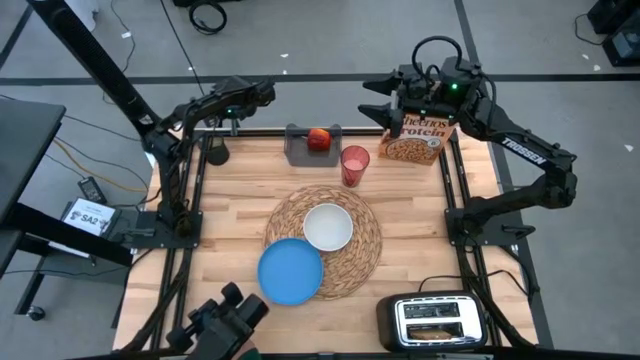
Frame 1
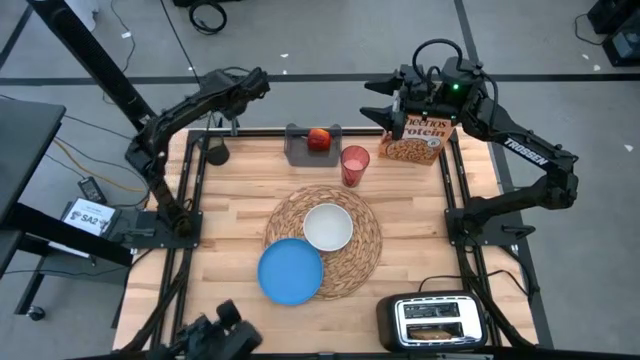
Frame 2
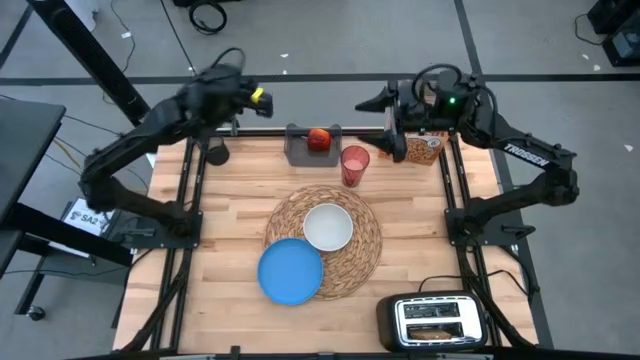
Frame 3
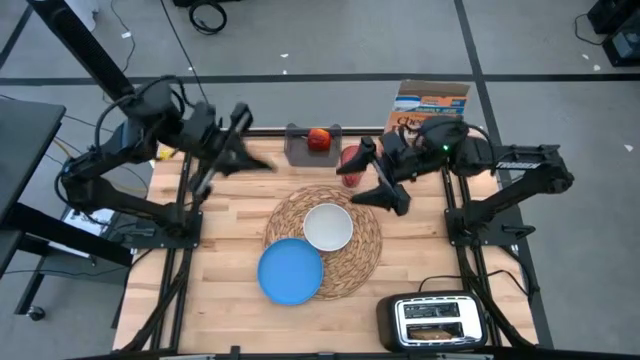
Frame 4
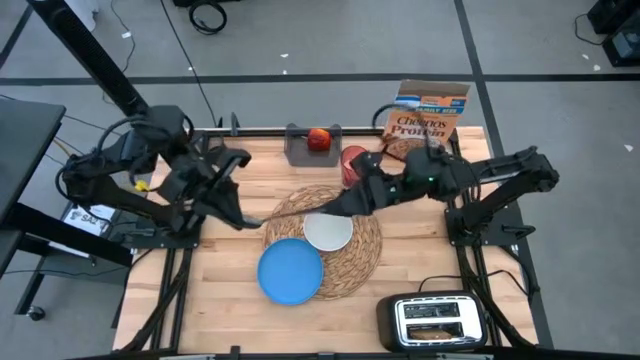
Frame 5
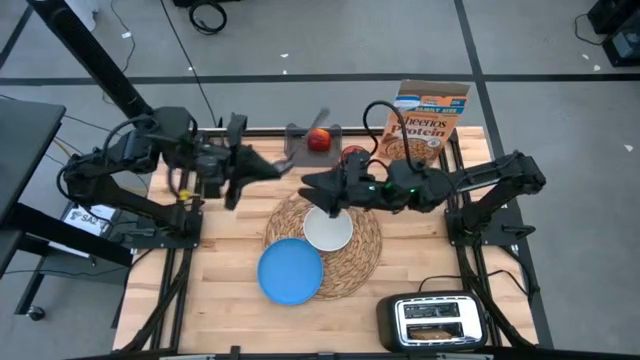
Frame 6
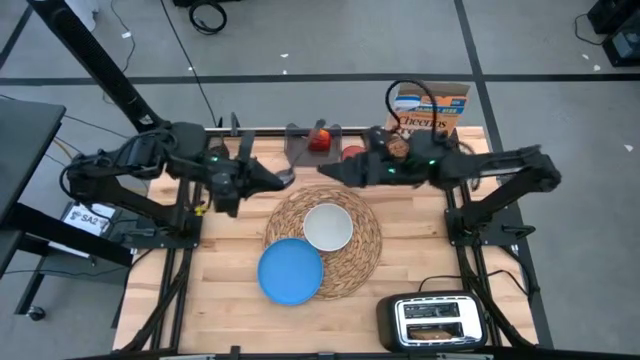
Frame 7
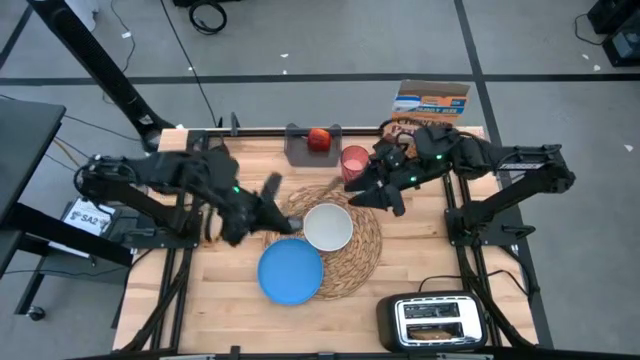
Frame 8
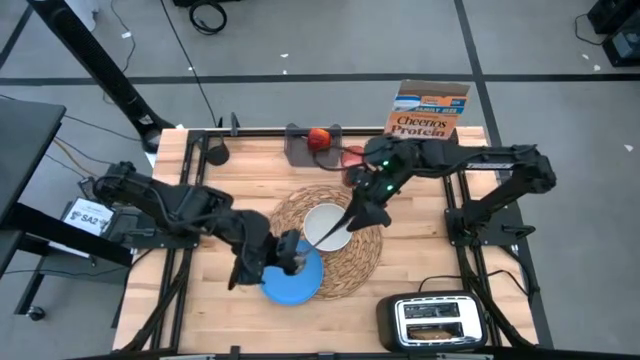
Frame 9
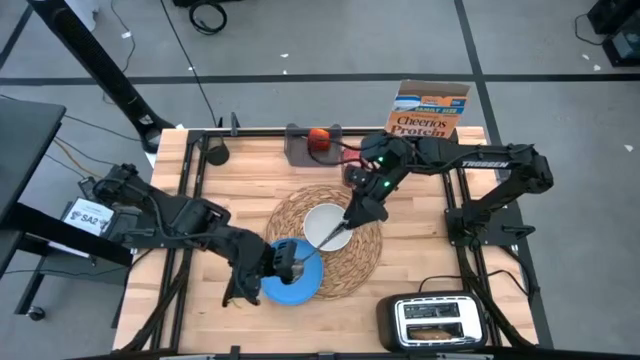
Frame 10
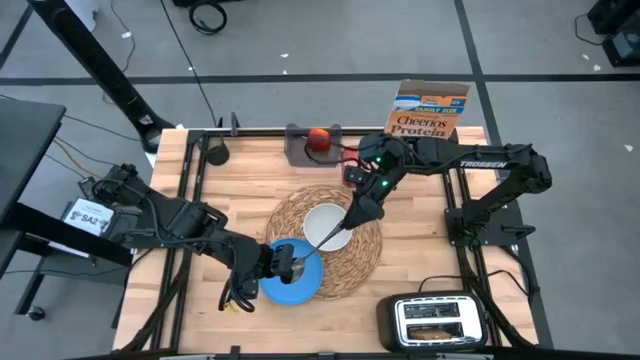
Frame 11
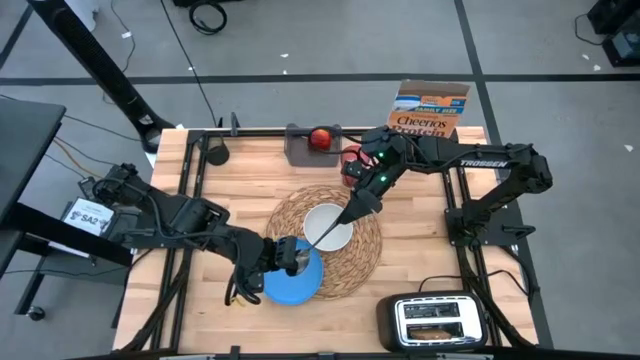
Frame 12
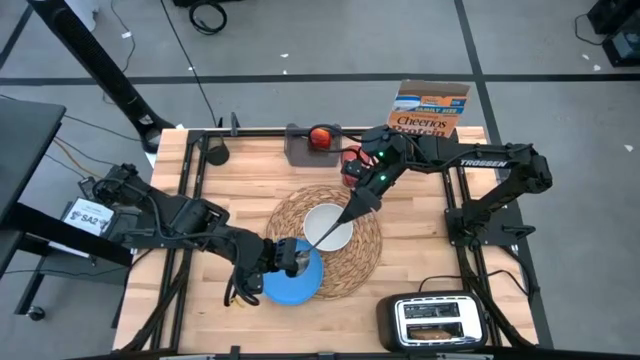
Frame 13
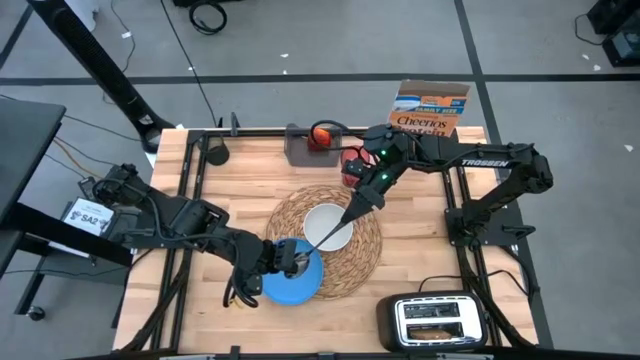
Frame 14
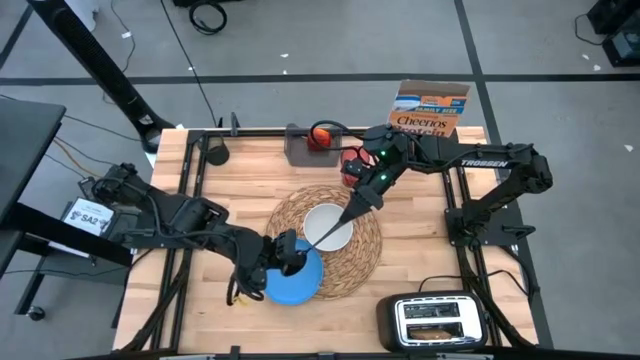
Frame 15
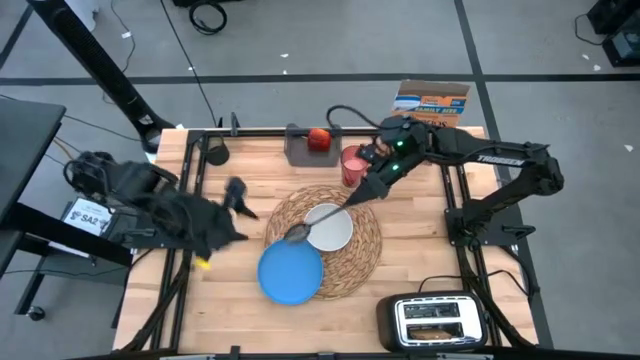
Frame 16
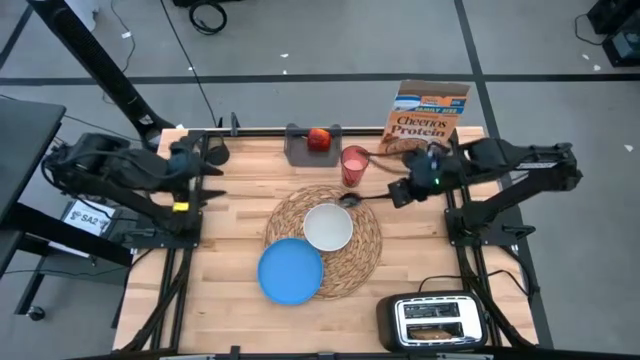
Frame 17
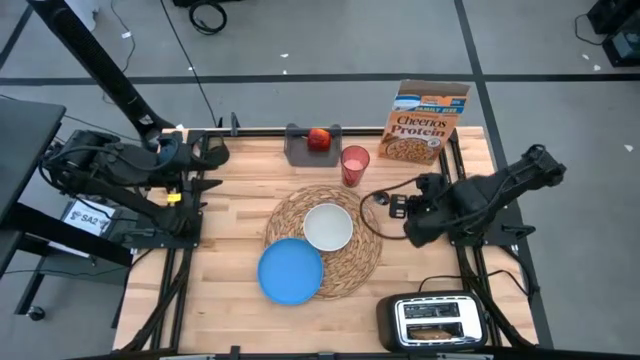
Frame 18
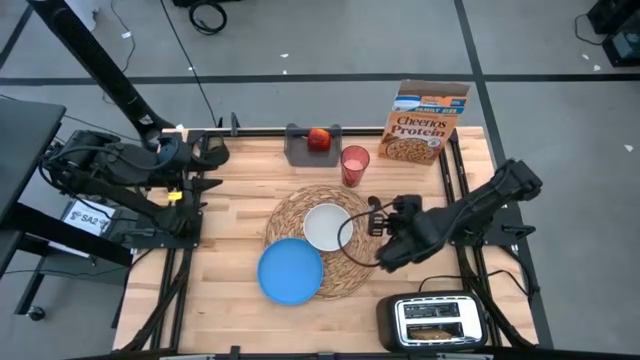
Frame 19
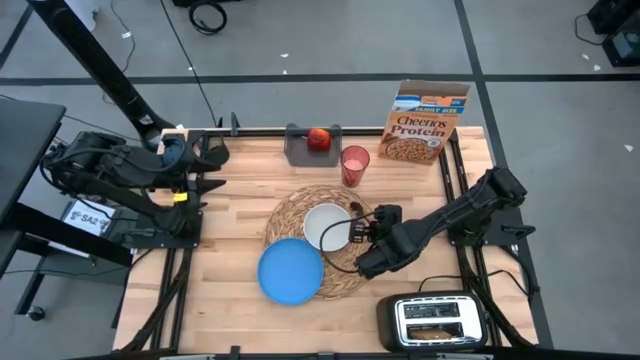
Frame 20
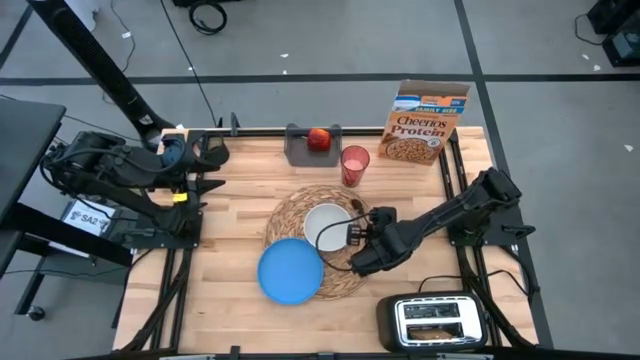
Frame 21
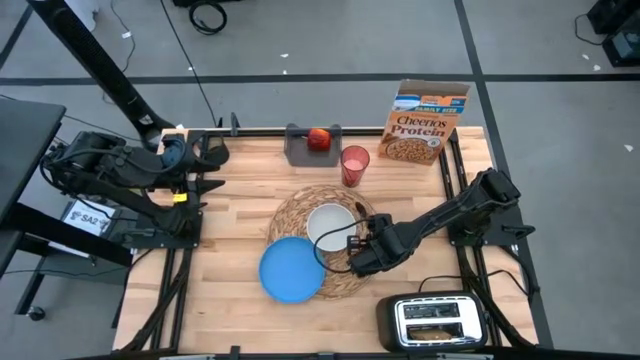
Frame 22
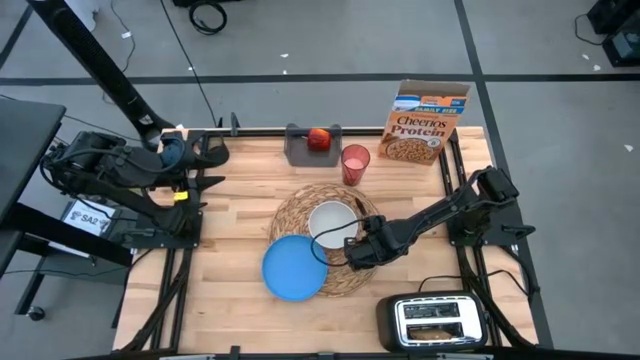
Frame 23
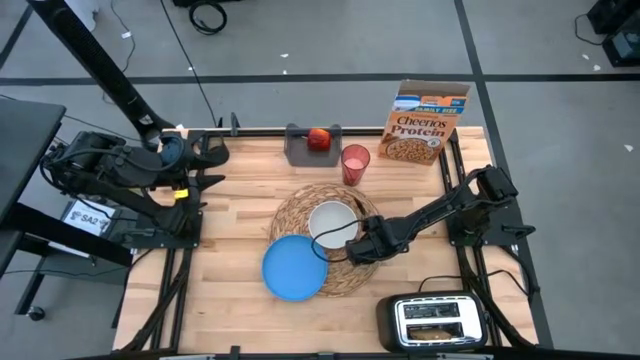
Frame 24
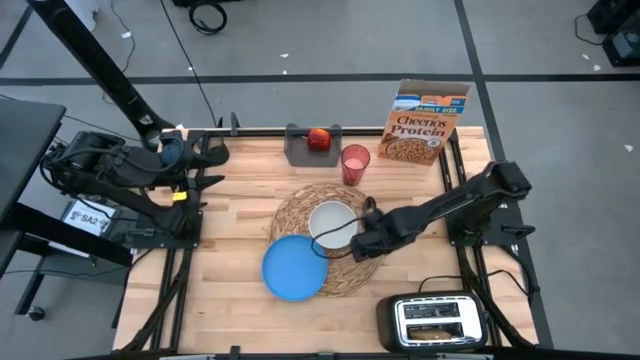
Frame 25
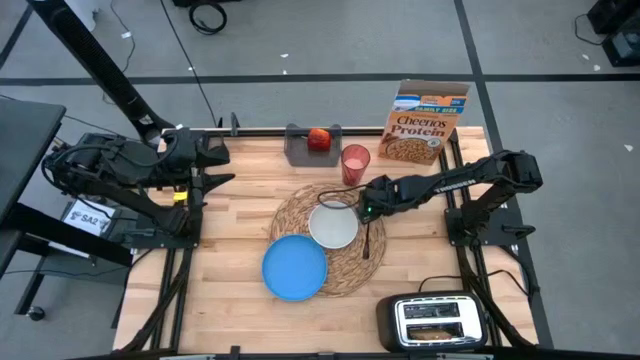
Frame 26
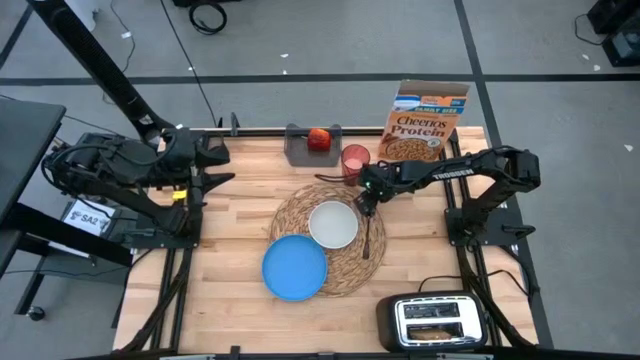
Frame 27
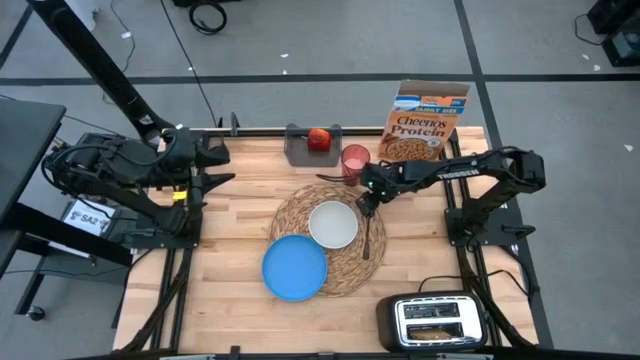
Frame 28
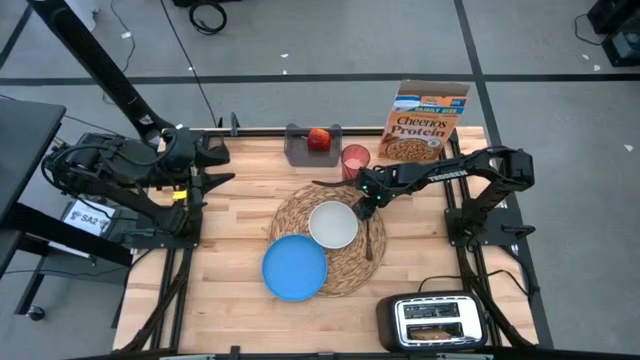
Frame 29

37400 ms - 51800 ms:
Task: Arrange a breakfast setting
Put the black spoon on the brown tablemat to the right of the white bowl

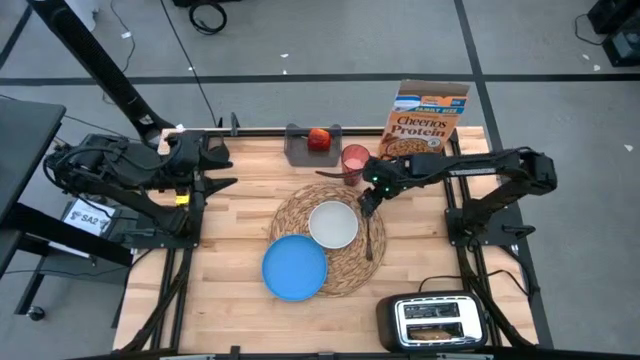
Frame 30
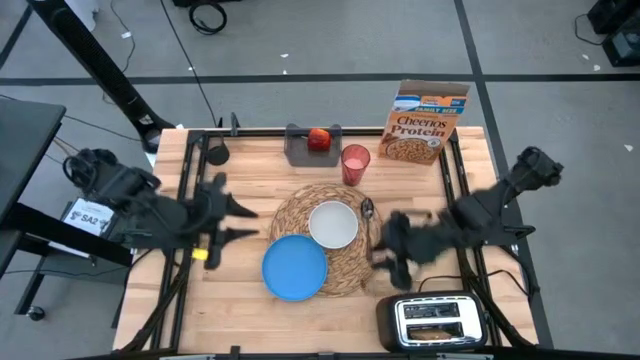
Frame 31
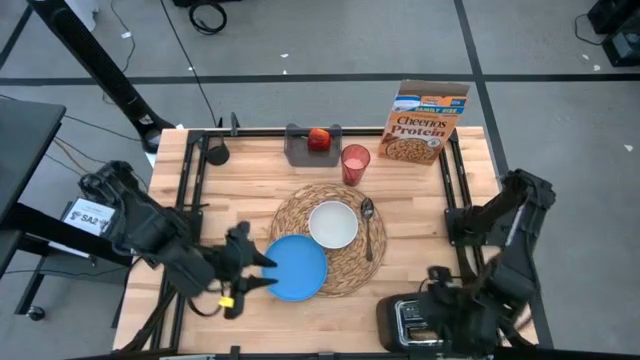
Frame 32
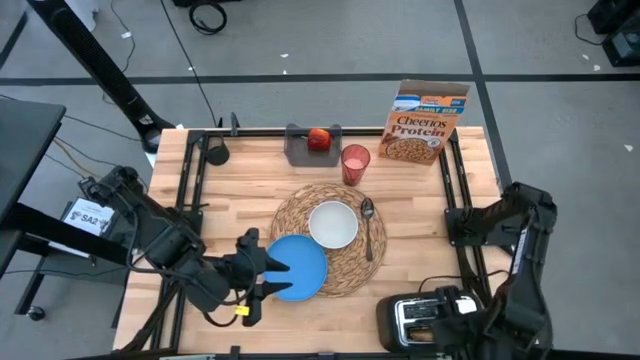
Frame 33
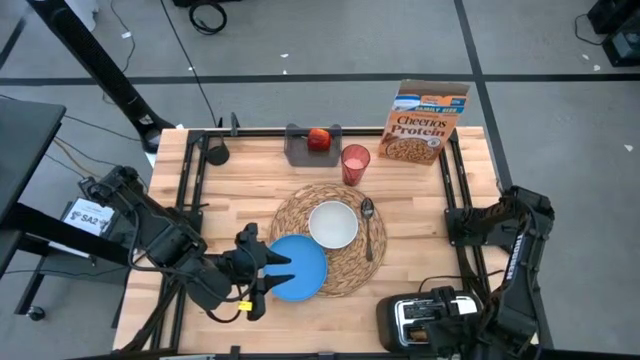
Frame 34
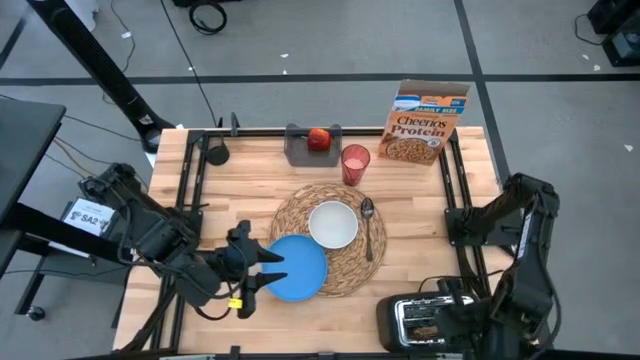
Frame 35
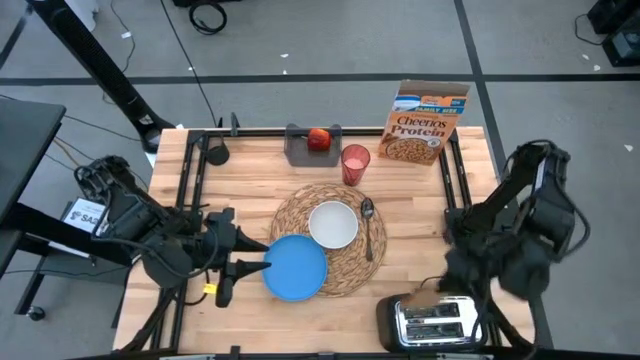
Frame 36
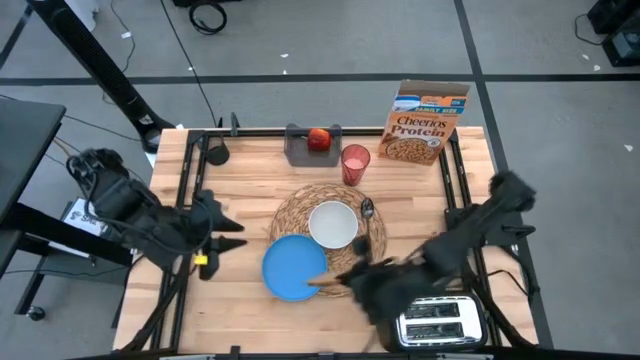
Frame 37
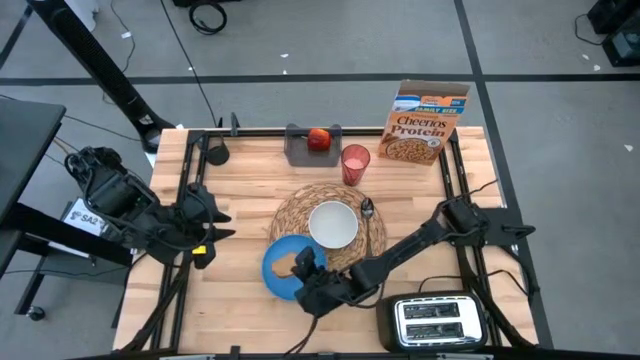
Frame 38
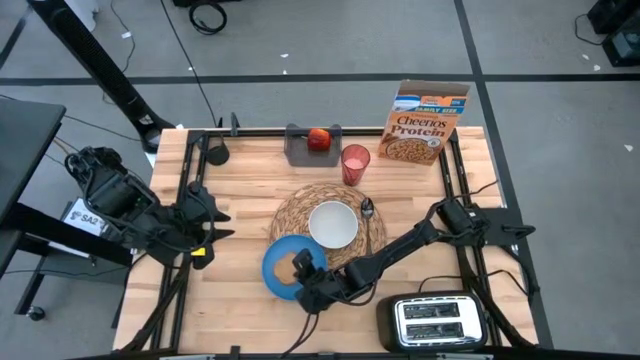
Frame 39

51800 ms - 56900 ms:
Put the toasted bread on the blue plate
